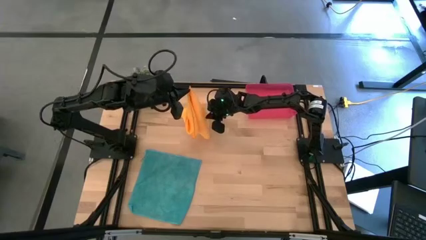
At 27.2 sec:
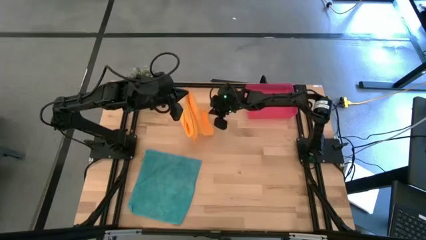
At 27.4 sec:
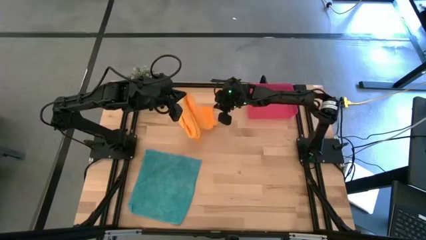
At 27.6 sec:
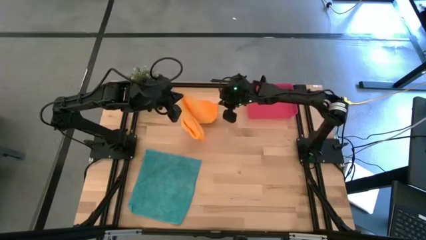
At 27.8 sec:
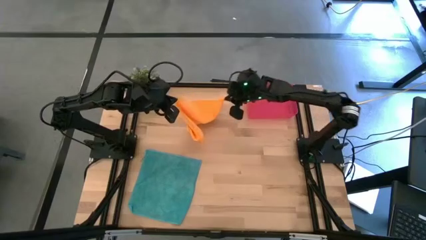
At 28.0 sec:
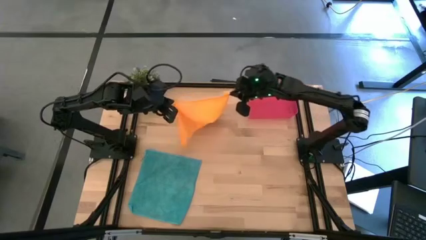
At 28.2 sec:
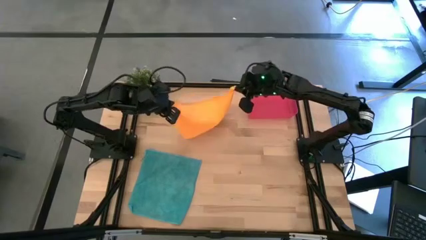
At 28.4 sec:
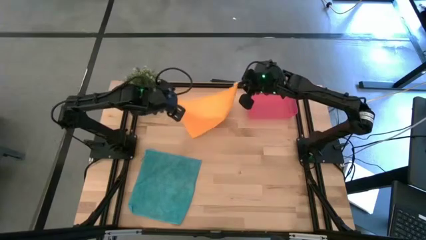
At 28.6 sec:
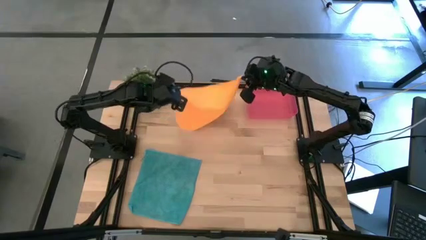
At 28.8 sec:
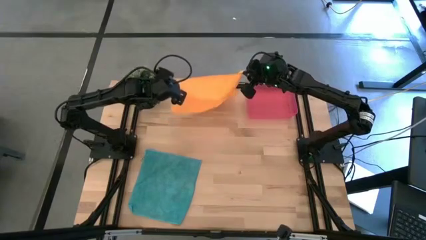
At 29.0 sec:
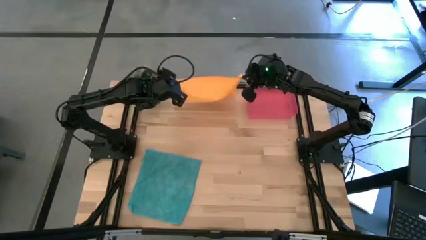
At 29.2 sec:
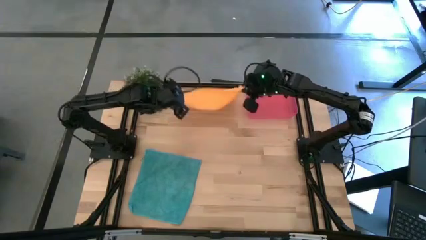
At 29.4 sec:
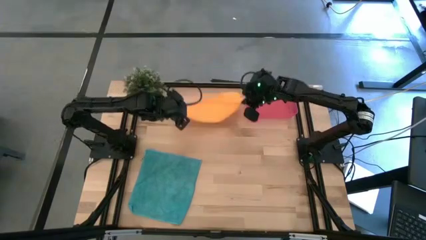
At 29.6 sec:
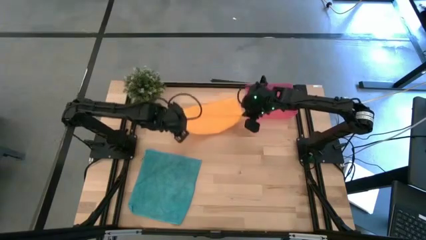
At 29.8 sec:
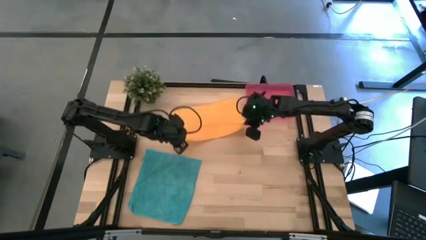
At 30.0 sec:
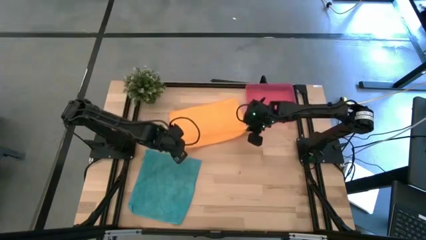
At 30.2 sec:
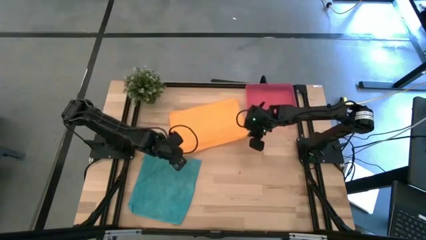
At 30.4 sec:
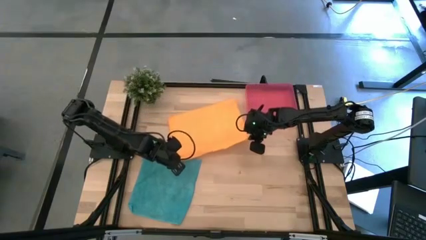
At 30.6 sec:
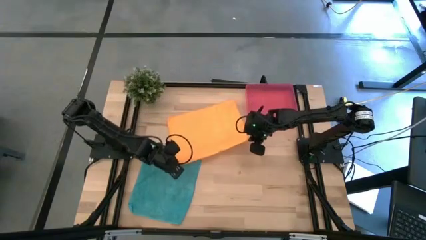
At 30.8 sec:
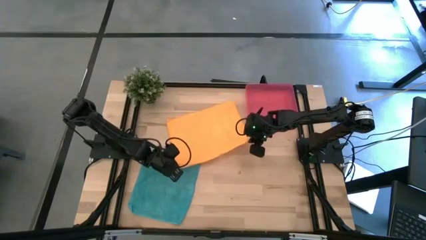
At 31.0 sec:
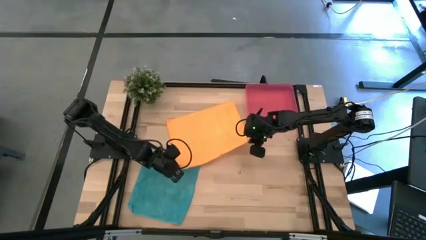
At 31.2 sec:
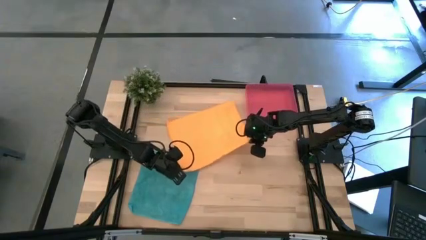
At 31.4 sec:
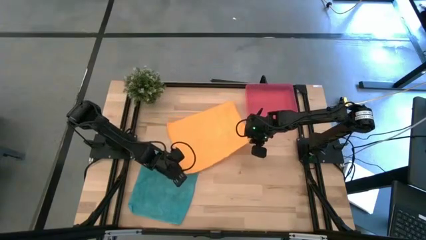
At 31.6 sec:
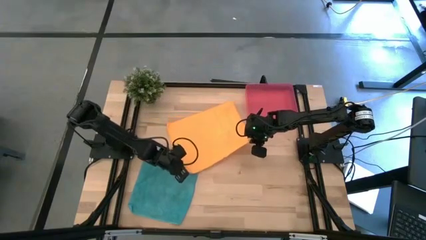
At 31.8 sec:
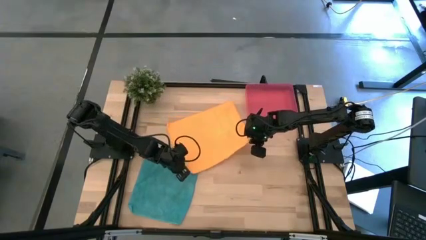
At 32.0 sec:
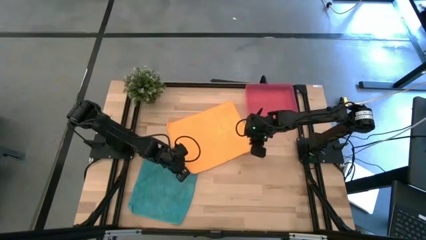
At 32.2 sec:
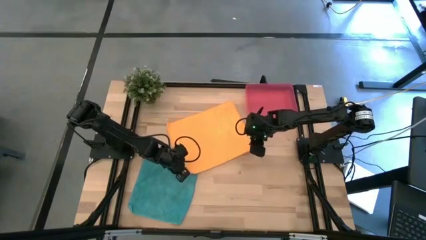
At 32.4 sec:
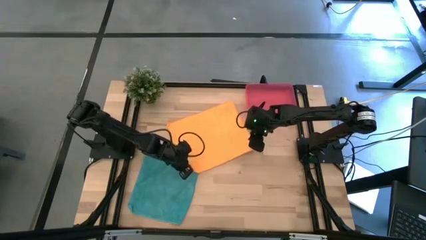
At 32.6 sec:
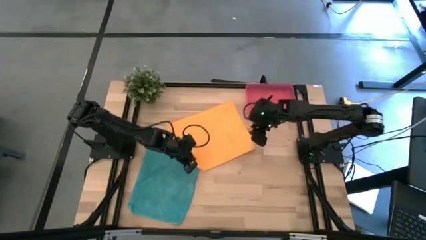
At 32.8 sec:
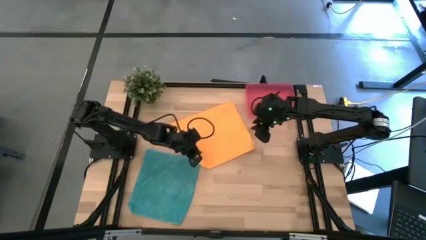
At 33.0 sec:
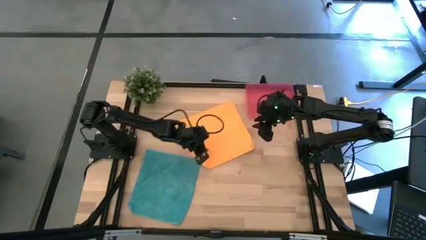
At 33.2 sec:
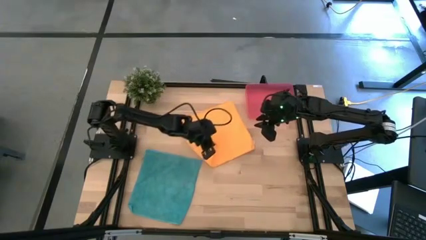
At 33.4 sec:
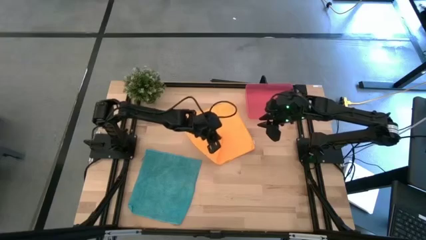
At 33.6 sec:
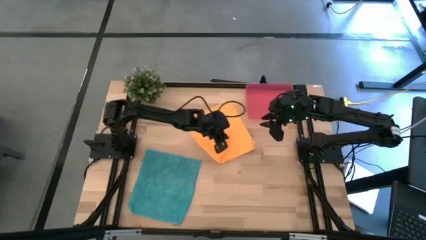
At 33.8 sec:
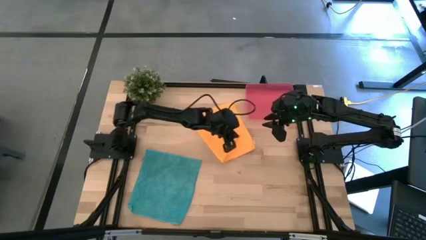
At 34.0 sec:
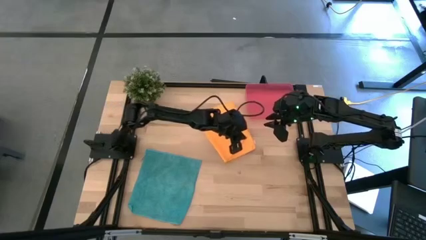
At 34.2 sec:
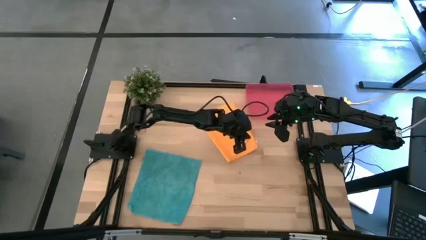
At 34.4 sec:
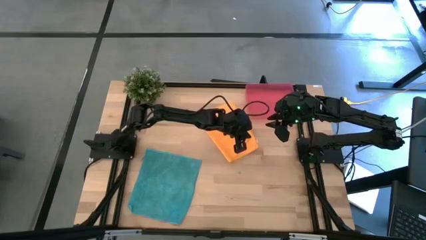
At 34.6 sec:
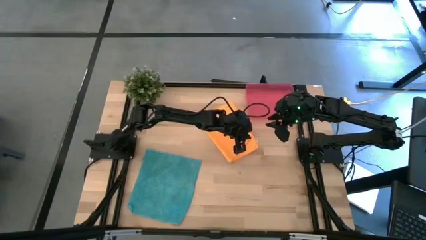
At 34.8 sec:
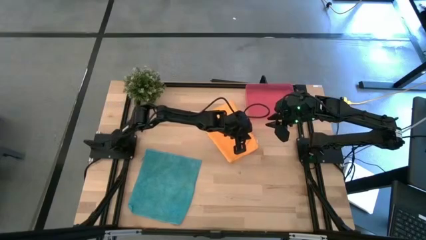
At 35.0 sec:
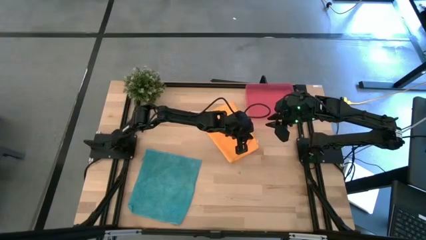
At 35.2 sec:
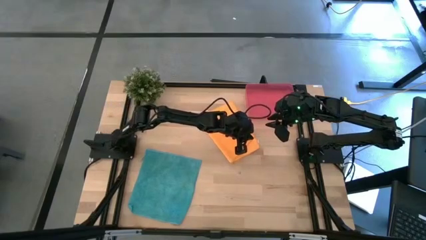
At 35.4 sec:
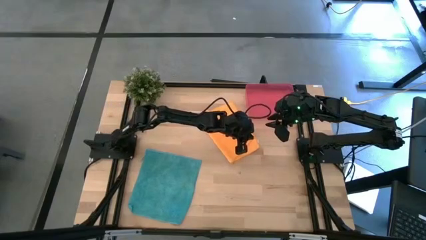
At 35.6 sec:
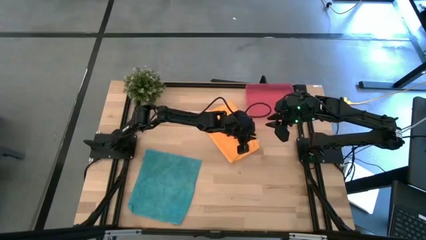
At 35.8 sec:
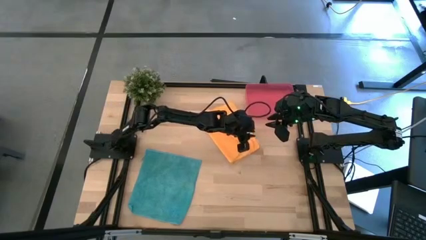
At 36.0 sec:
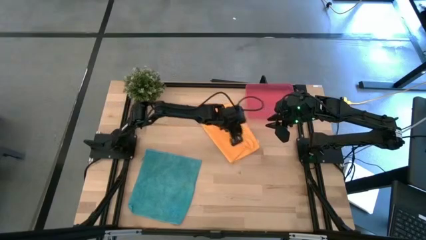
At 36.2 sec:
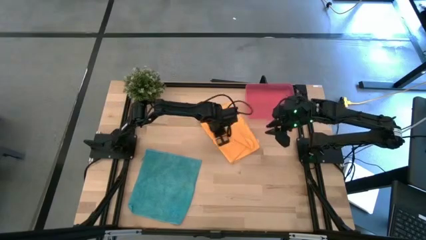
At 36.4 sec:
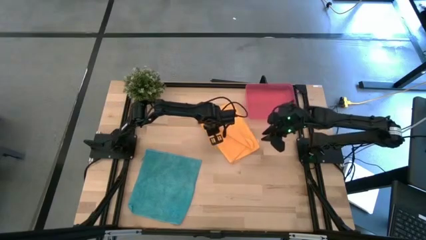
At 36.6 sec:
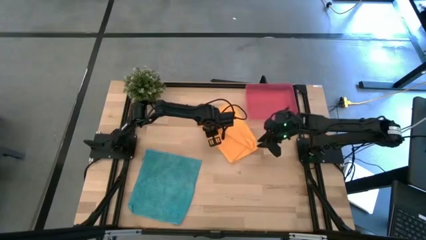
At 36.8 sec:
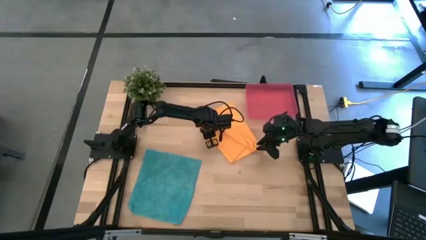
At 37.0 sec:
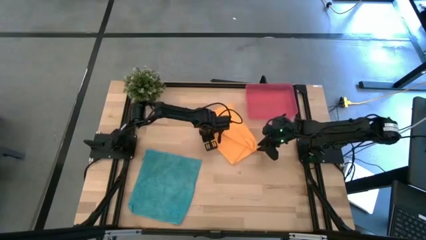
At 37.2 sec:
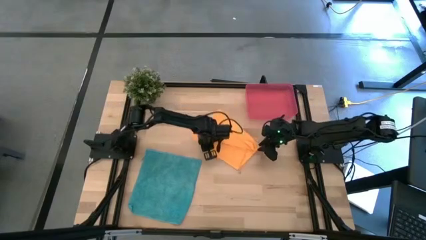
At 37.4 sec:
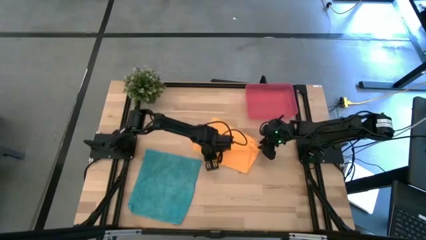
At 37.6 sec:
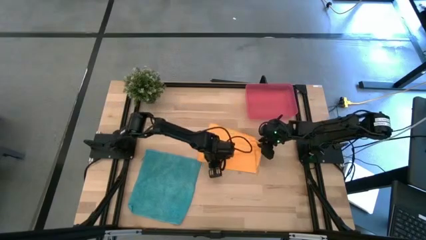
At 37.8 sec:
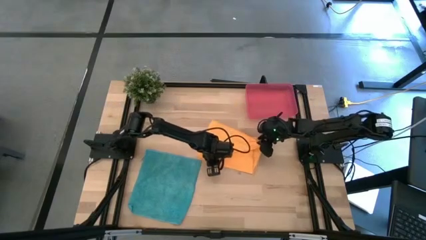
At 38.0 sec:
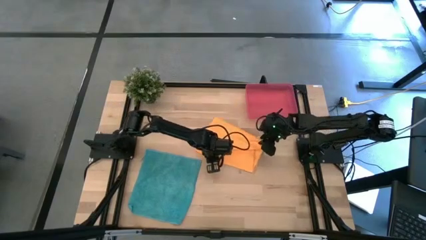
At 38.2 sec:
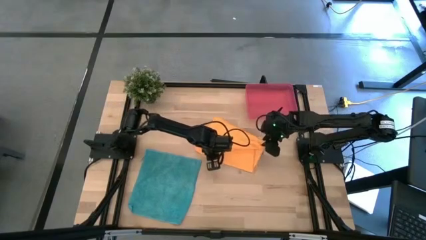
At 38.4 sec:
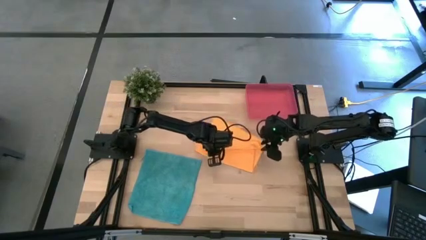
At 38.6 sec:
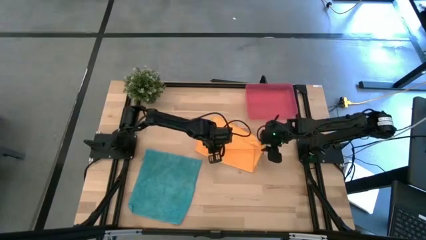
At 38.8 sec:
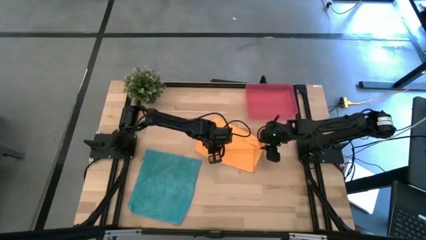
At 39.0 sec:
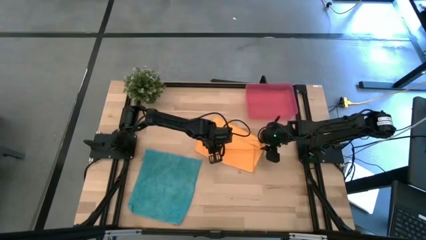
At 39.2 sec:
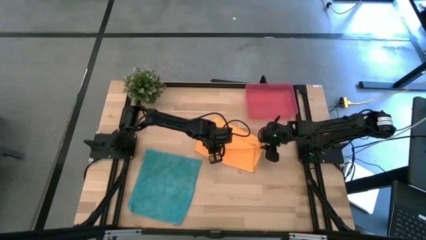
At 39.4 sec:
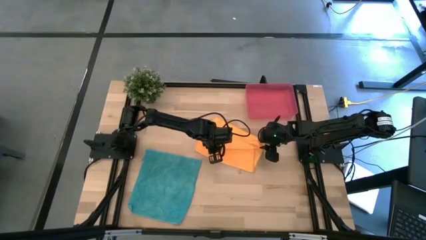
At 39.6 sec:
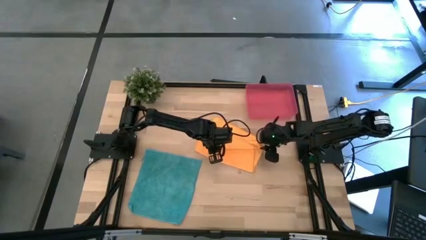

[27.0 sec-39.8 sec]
Task: Roll microfiber towels into tight, uniform cylinder then place into a basket
Fold the orange microfiber towel

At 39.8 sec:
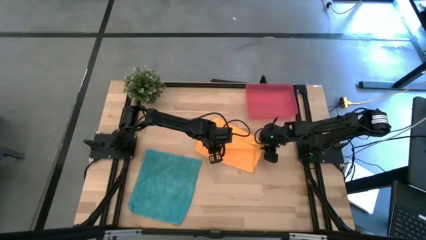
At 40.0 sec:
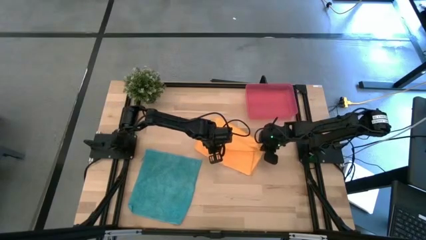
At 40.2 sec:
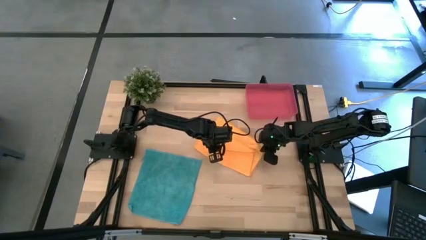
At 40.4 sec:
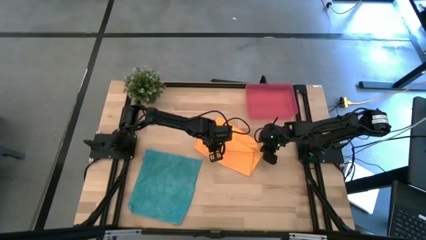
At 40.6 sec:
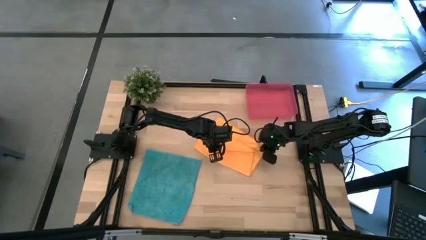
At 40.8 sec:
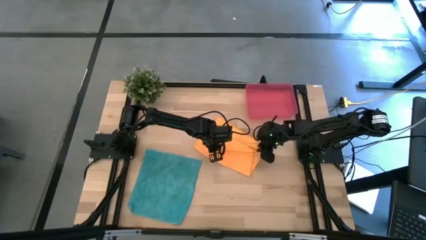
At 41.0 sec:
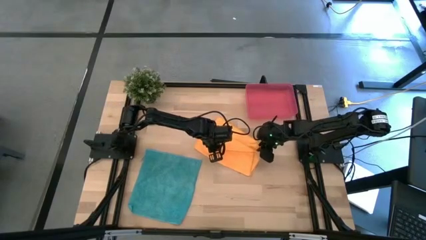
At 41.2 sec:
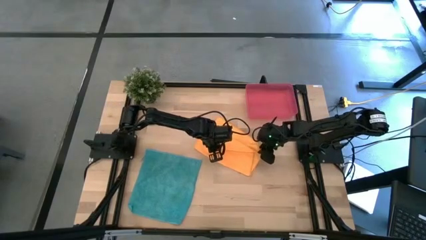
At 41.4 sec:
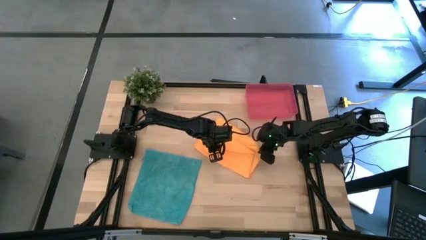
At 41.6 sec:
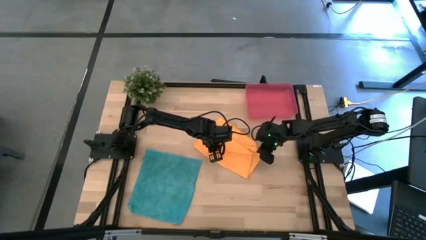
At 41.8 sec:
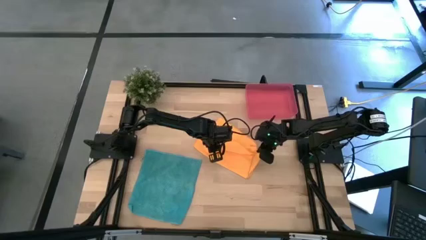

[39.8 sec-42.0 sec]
Fold the orange microfiber towel
